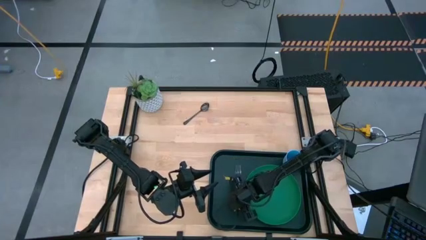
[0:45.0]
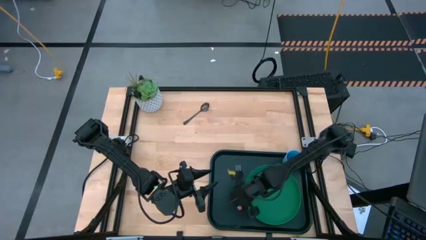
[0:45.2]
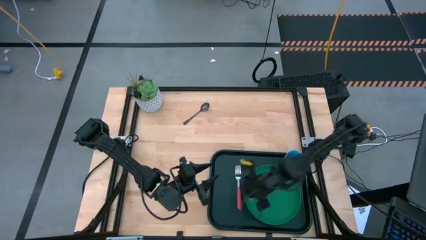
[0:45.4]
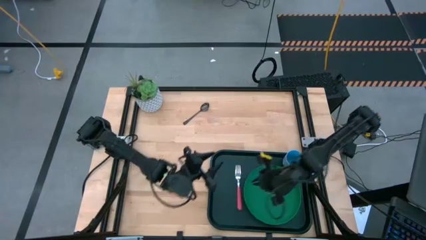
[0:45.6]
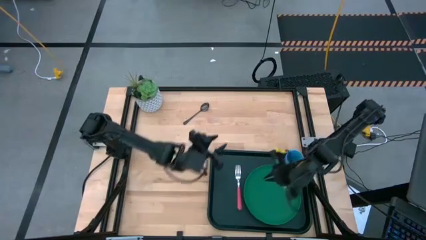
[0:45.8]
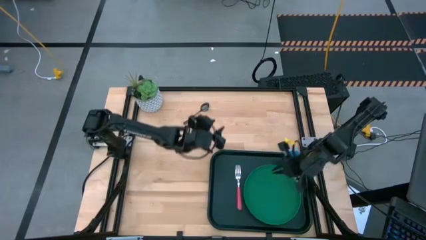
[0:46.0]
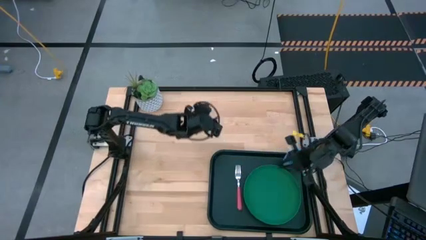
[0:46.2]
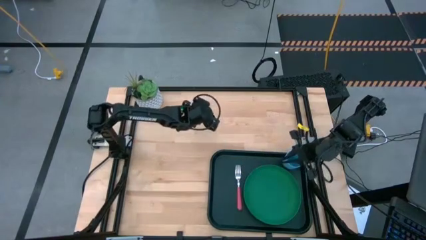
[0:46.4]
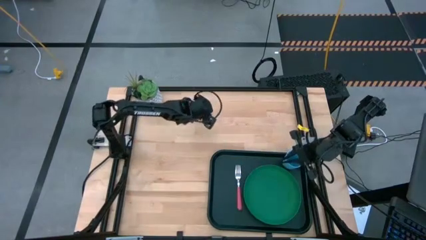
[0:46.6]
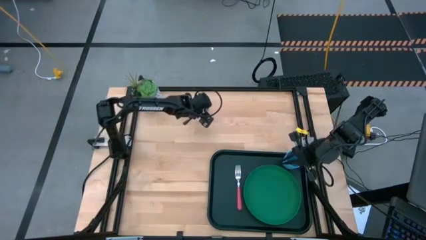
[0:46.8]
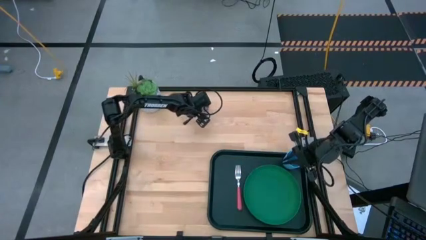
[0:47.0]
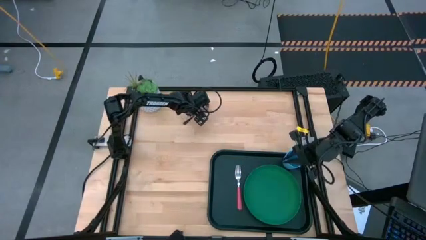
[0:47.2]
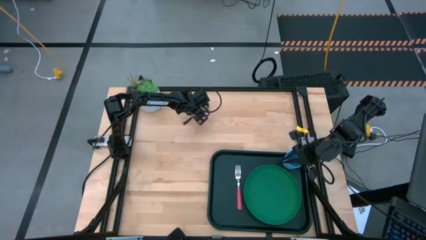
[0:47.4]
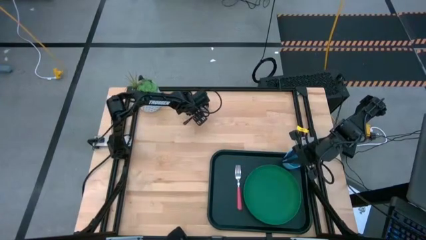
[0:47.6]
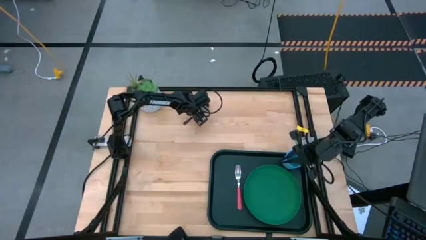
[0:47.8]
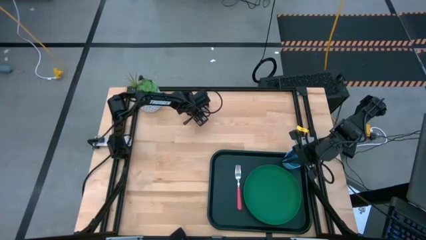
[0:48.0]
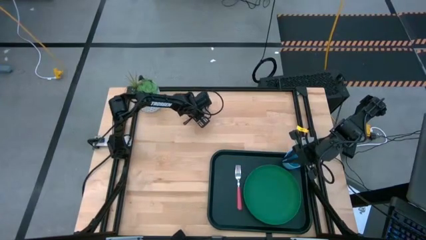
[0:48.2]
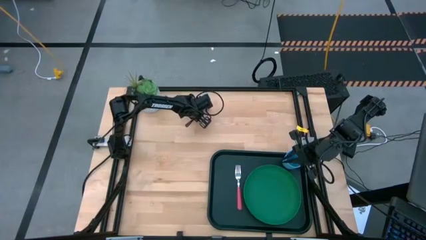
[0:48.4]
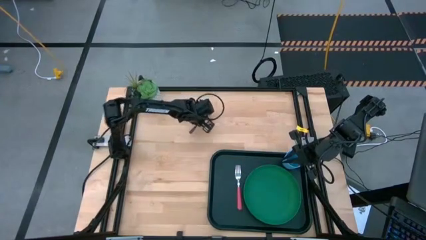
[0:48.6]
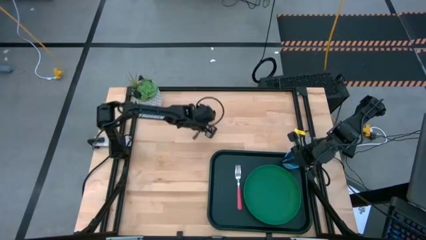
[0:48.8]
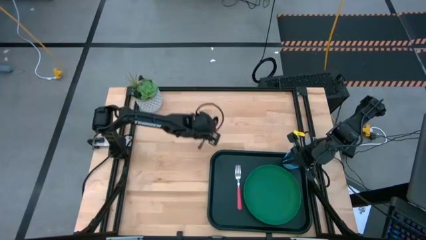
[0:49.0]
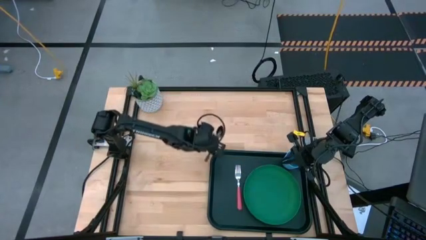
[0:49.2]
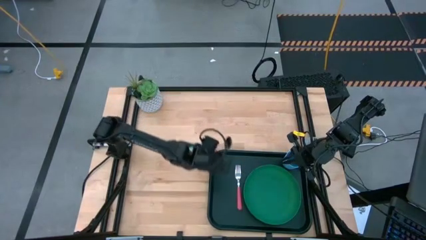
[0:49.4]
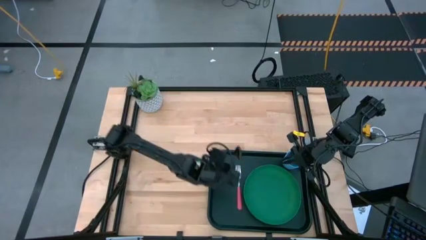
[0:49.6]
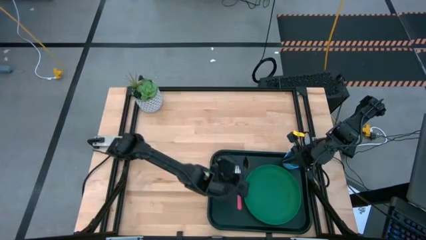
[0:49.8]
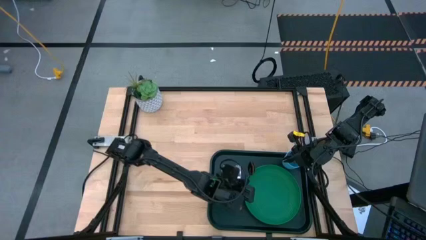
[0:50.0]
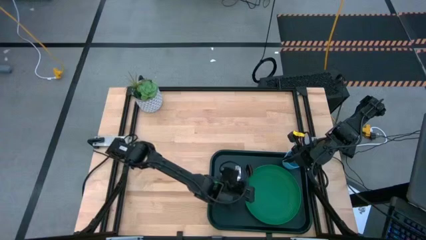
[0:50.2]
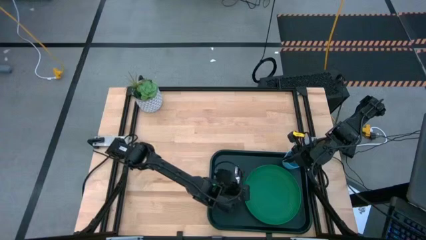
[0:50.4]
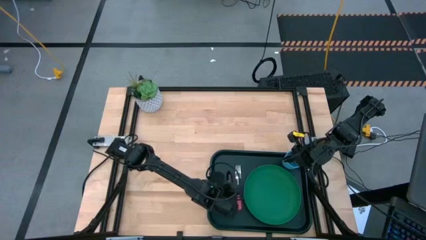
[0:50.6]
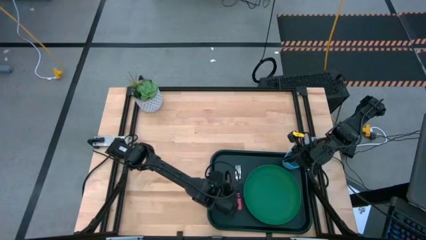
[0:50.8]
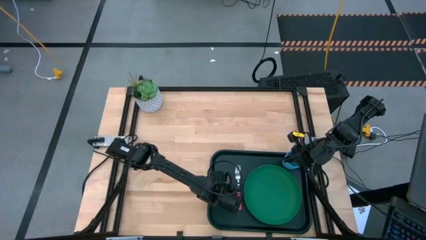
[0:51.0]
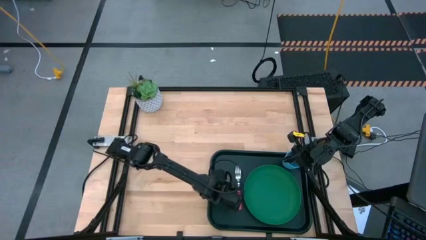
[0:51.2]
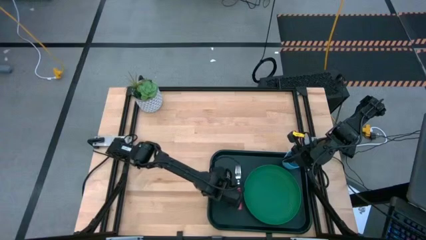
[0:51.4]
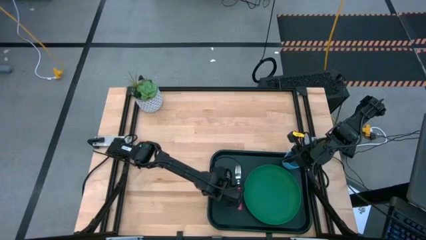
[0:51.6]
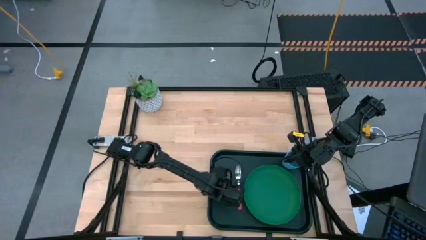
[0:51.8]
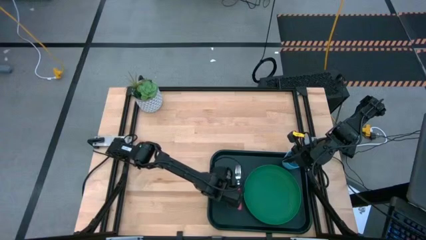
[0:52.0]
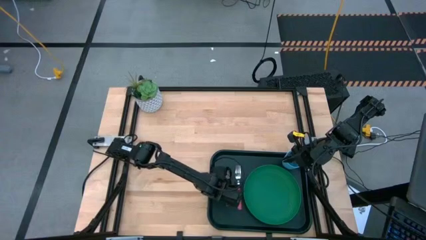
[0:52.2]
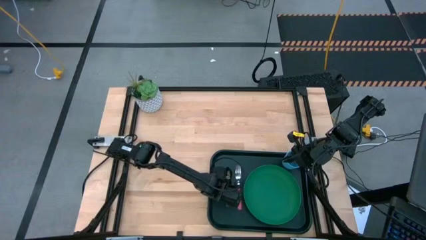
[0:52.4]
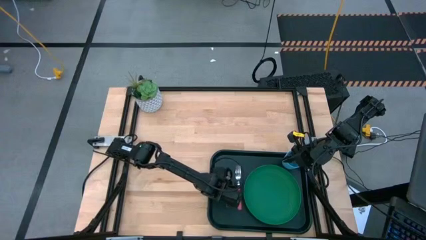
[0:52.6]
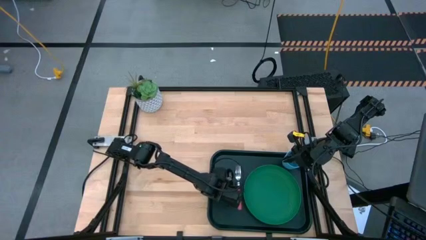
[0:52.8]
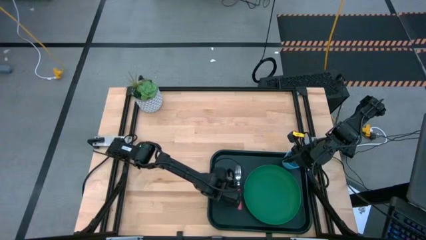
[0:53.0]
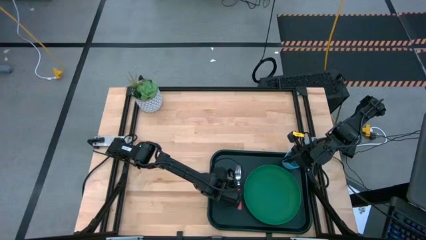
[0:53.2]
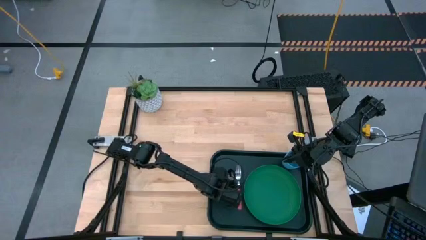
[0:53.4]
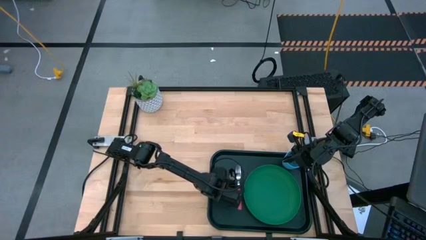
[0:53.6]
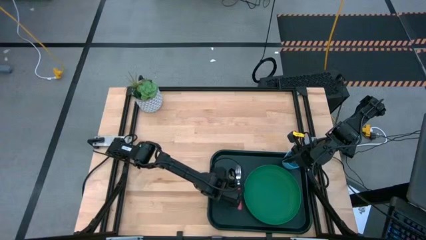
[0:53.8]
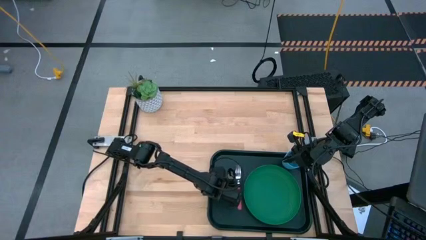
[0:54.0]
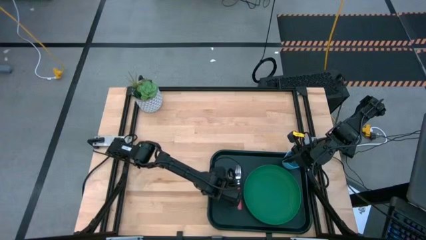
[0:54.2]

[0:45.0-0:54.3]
Task: Pick and place plate/cup/fork/spoon on tray
Put the black spoon on the black serving tray beside the orange fork

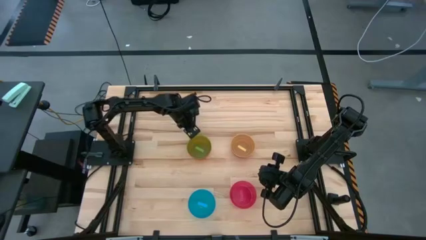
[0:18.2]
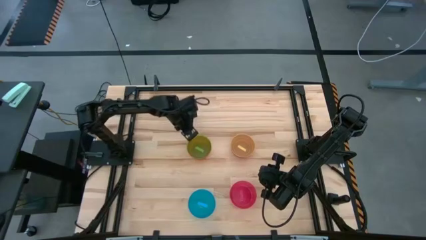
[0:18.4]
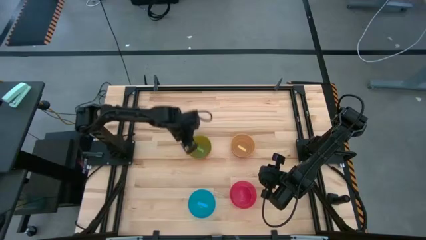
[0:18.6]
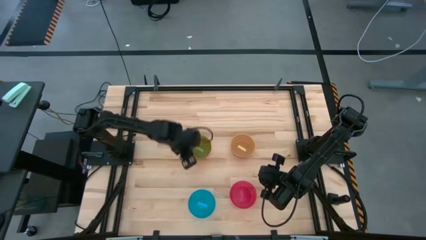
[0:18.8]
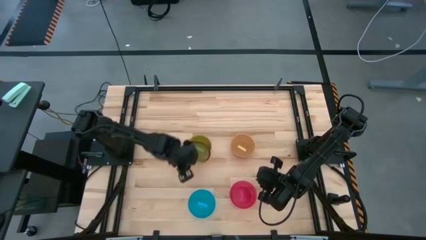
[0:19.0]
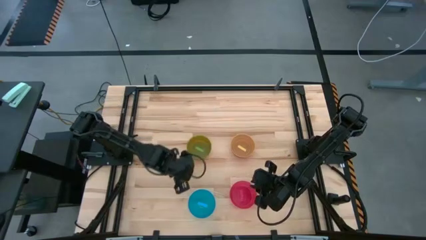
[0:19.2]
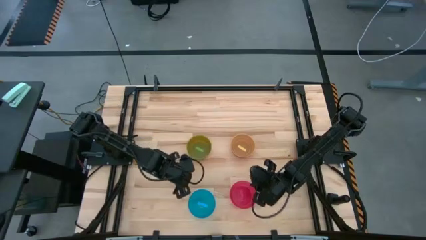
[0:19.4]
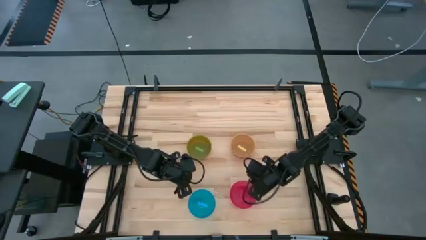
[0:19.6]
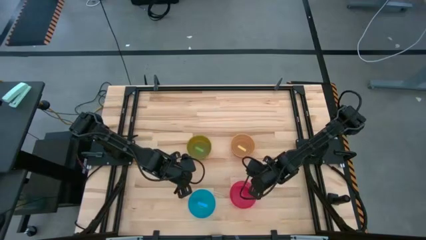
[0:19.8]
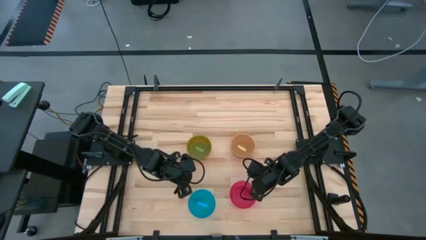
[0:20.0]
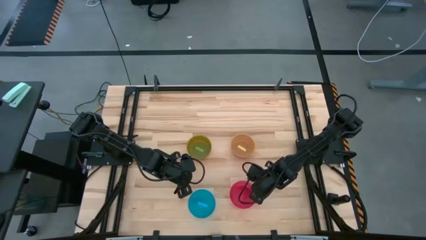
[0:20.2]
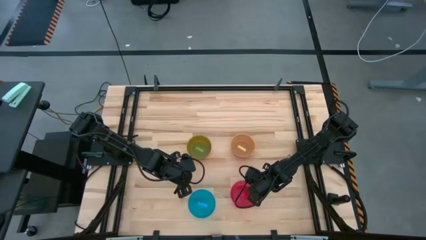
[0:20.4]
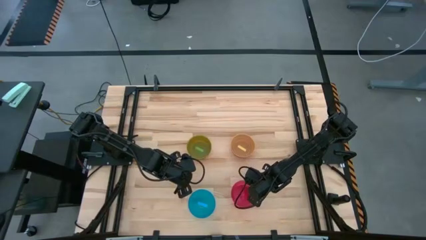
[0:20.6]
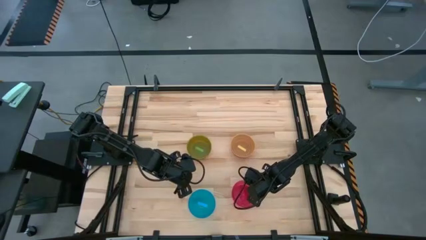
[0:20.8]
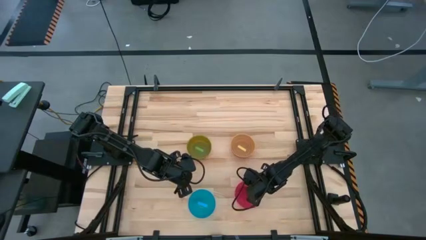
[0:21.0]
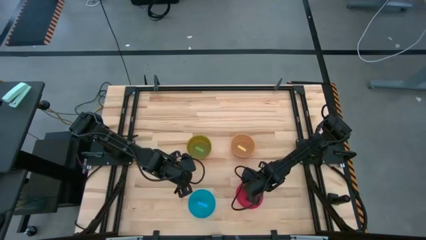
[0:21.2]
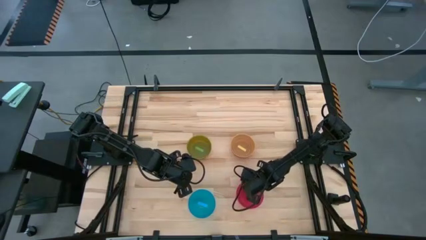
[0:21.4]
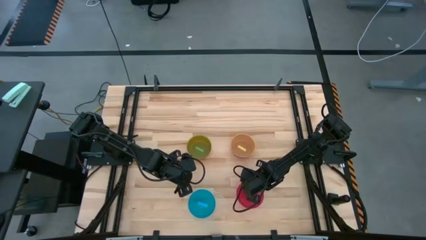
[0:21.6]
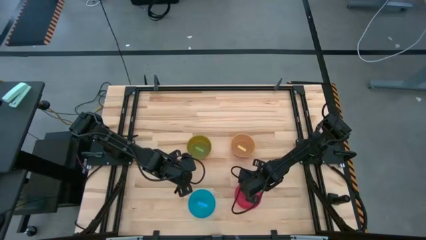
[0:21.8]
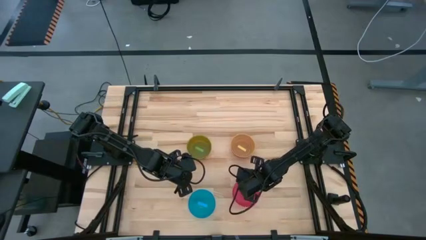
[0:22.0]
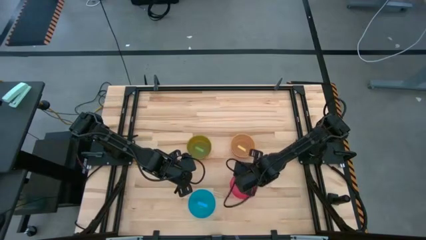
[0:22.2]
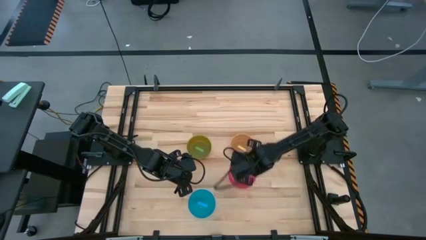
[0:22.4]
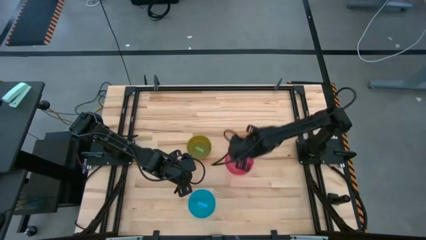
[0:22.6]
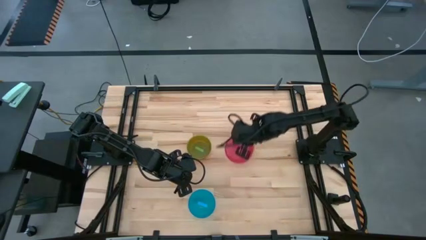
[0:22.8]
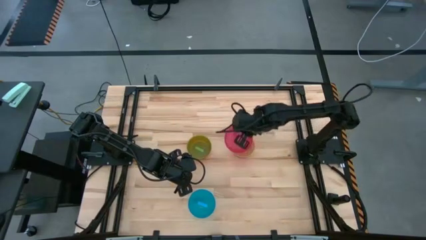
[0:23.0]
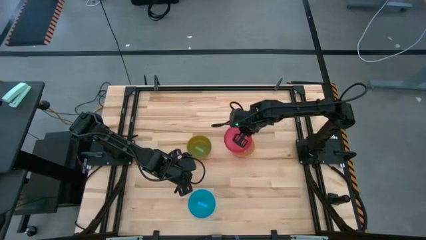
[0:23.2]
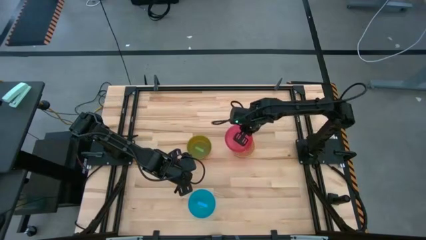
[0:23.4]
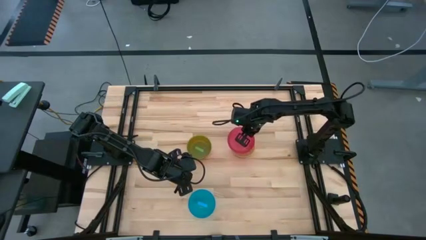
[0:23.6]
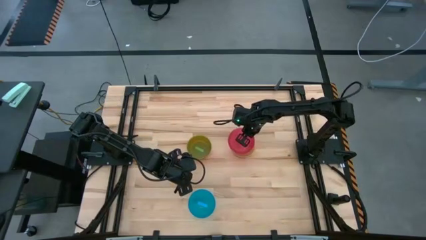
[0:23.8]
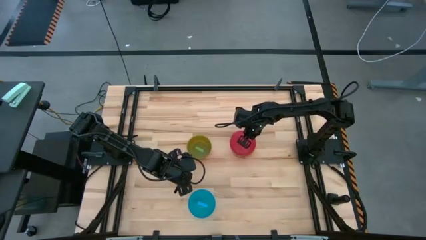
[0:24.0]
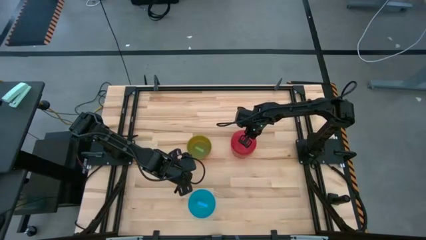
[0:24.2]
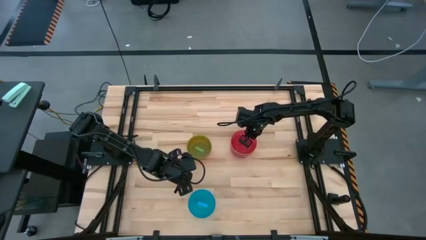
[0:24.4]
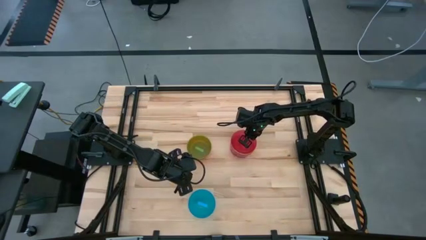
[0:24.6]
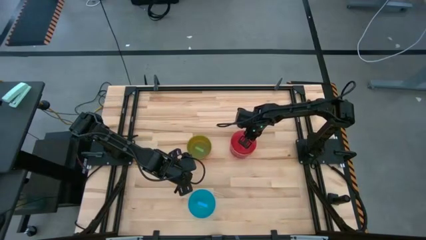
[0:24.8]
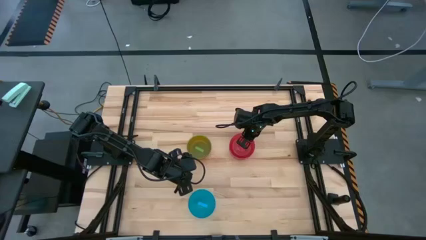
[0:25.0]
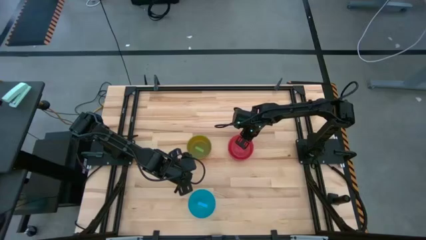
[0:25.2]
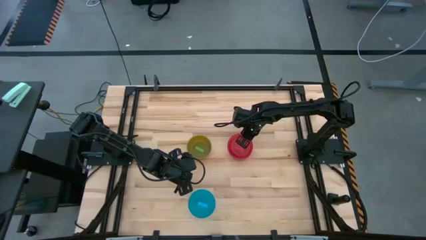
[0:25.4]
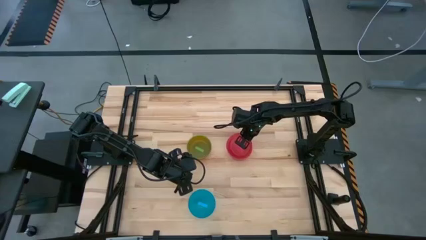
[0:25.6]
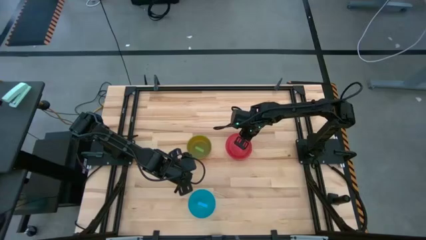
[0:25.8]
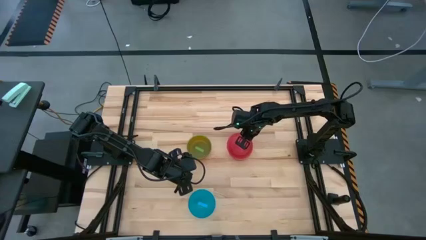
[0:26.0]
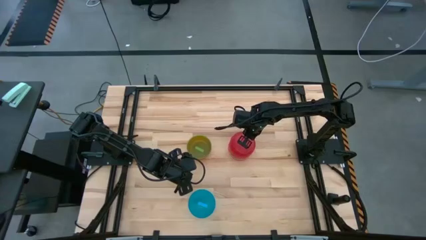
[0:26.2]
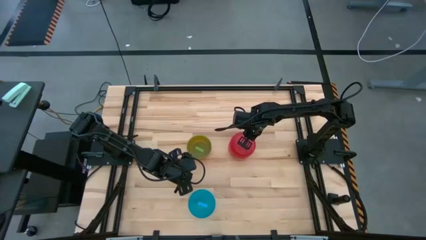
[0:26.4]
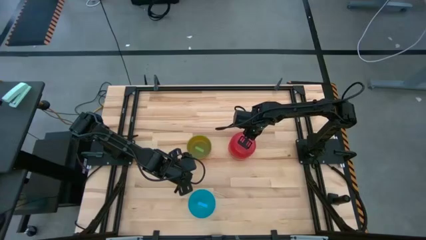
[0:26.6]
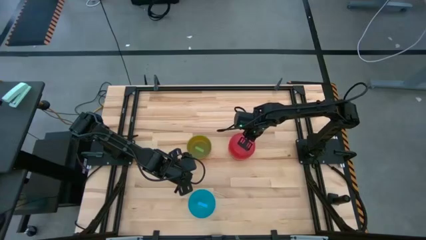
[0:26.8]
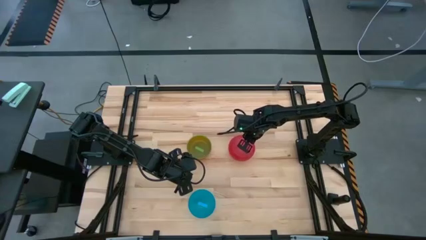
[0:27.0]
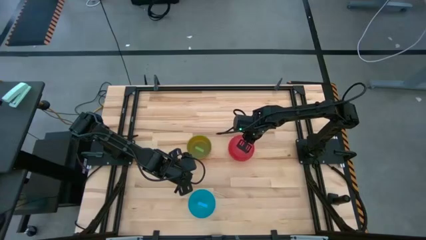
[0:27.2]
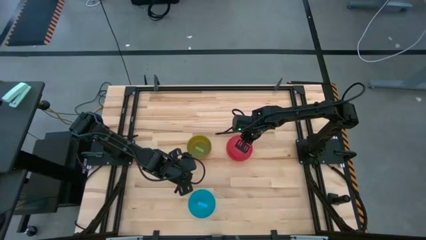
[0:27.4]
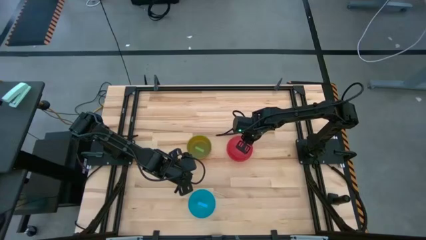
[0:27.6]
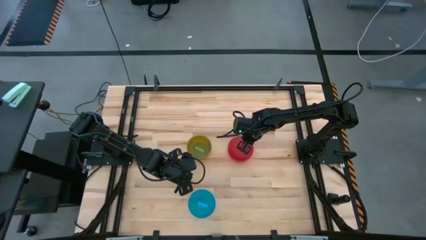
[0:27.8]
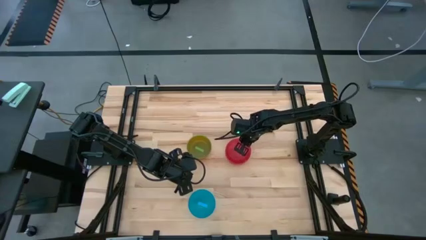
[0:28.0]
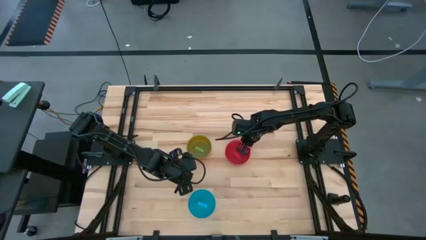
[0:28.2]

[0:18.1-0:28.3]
Task: Nest bowls inside each other
Stack the pink bowl on the yellow bowl
